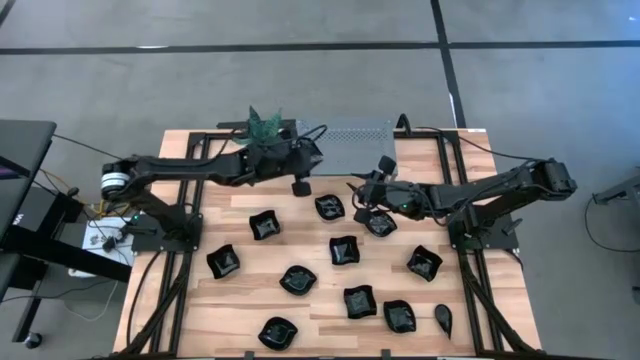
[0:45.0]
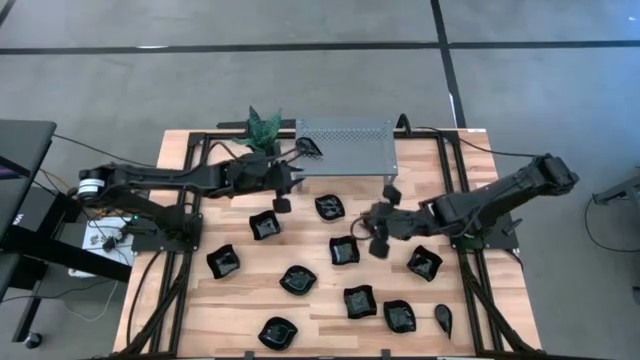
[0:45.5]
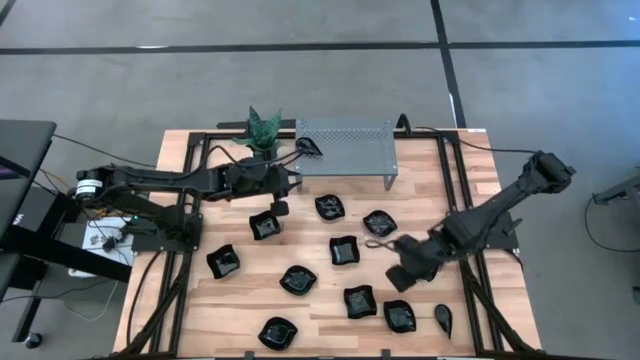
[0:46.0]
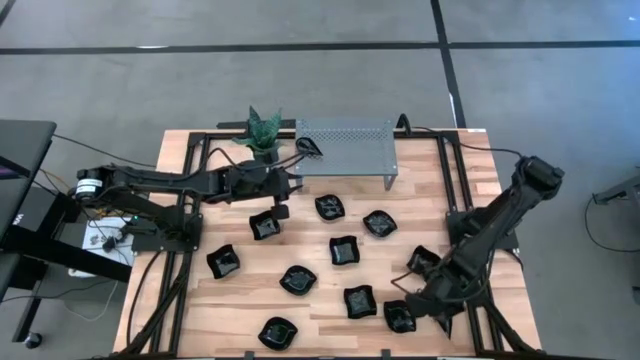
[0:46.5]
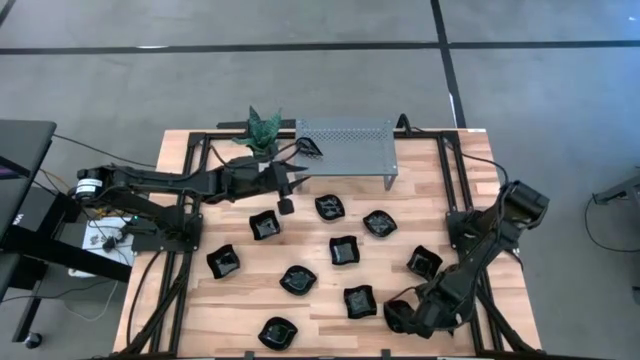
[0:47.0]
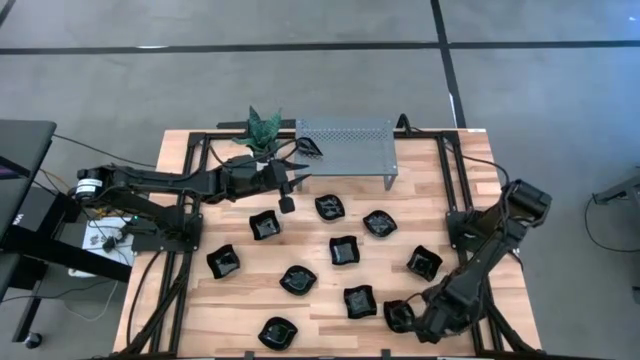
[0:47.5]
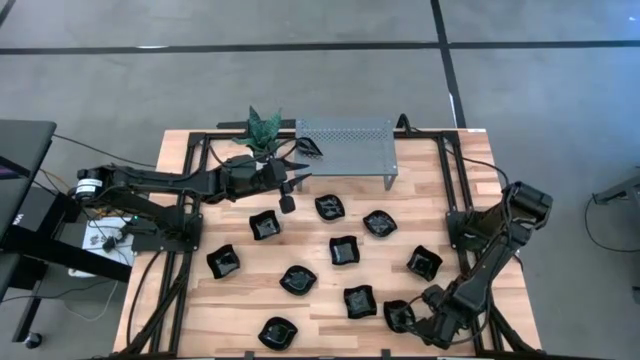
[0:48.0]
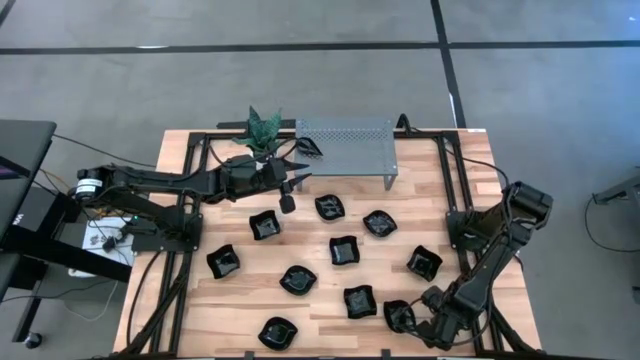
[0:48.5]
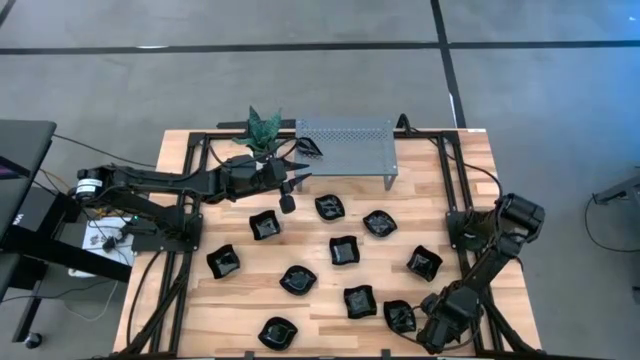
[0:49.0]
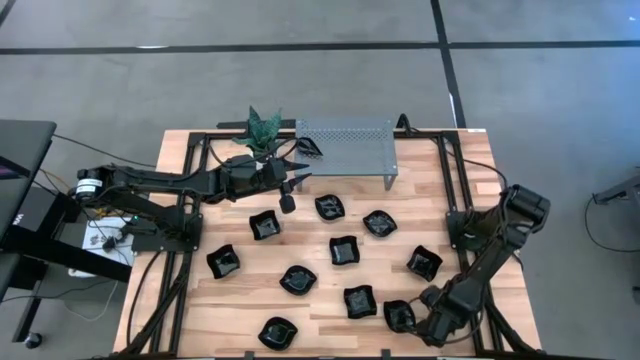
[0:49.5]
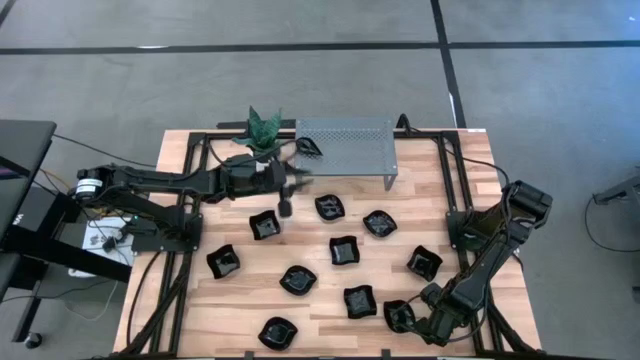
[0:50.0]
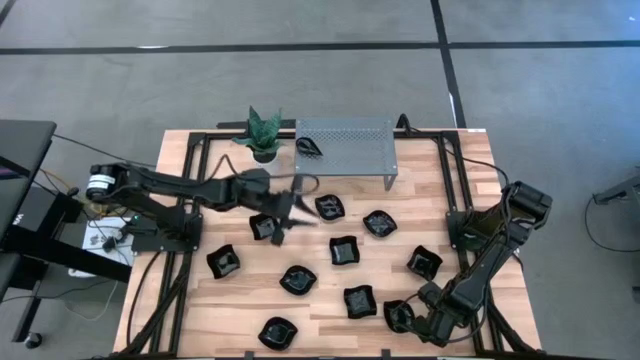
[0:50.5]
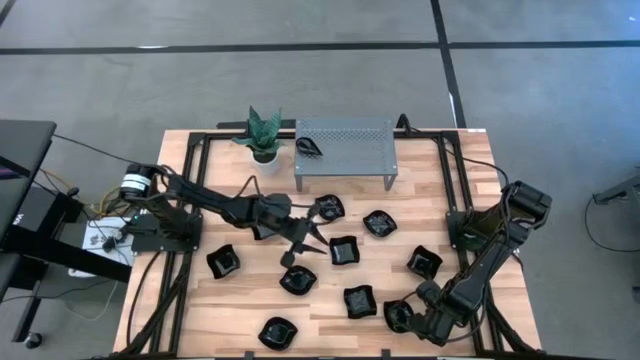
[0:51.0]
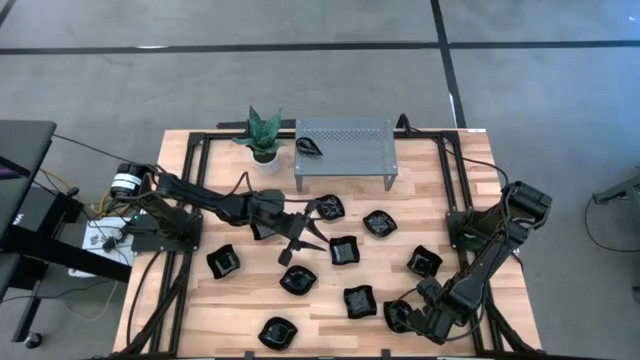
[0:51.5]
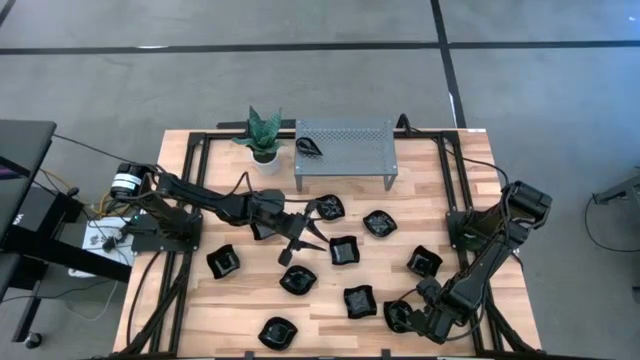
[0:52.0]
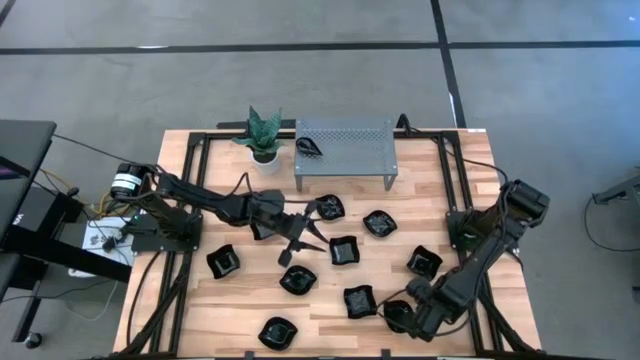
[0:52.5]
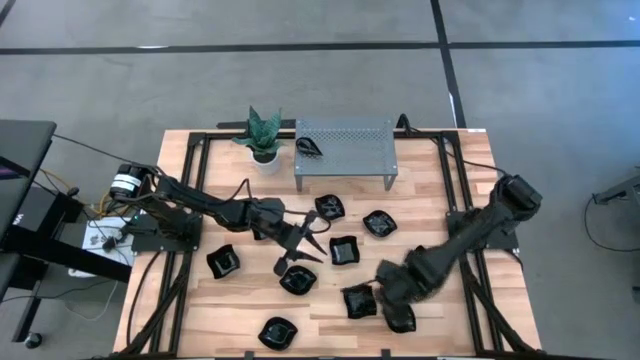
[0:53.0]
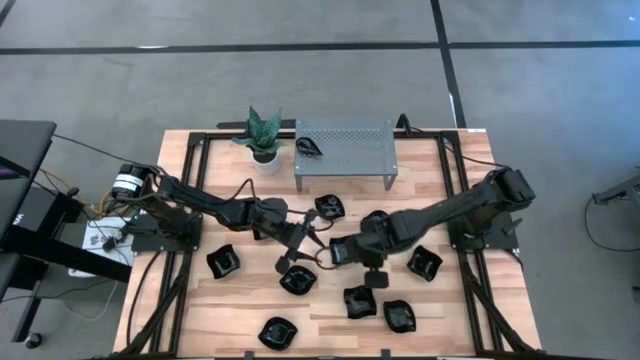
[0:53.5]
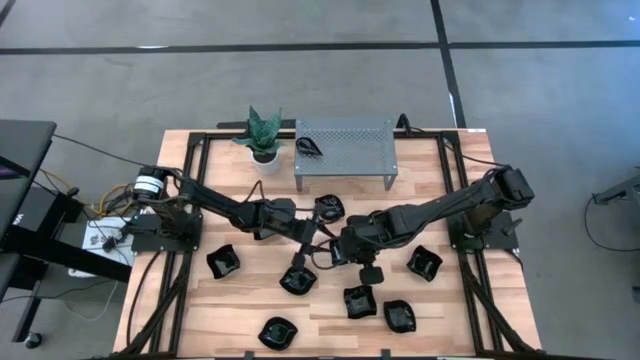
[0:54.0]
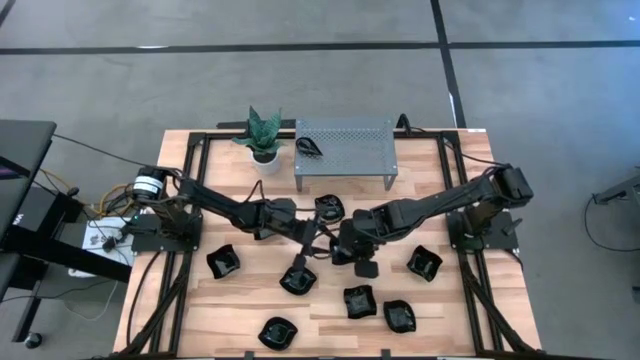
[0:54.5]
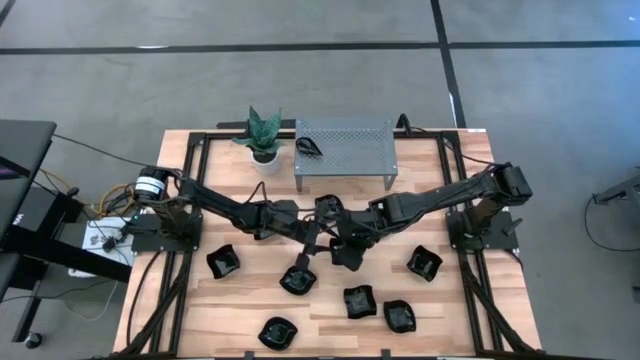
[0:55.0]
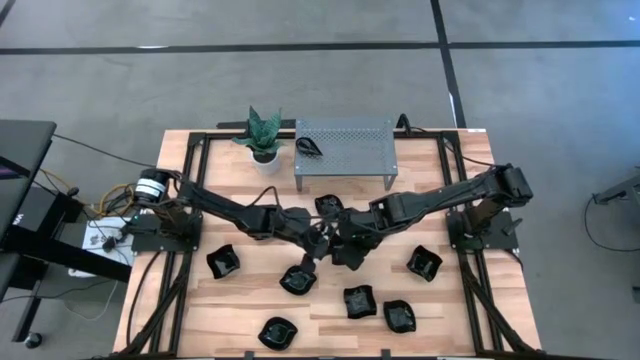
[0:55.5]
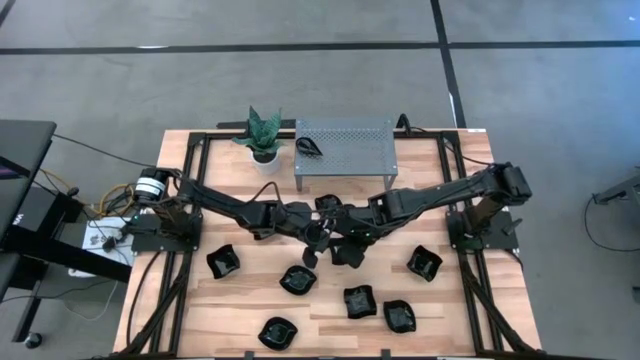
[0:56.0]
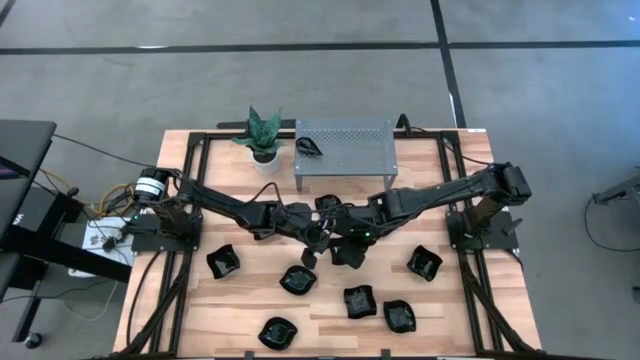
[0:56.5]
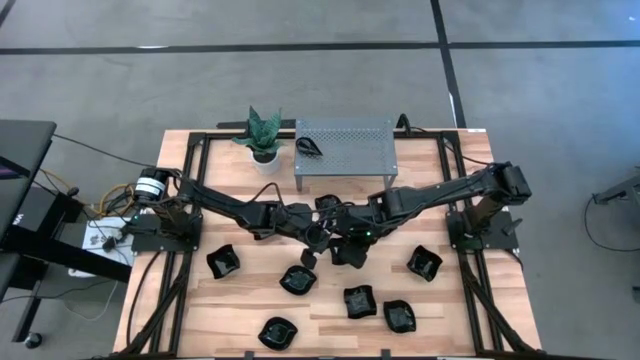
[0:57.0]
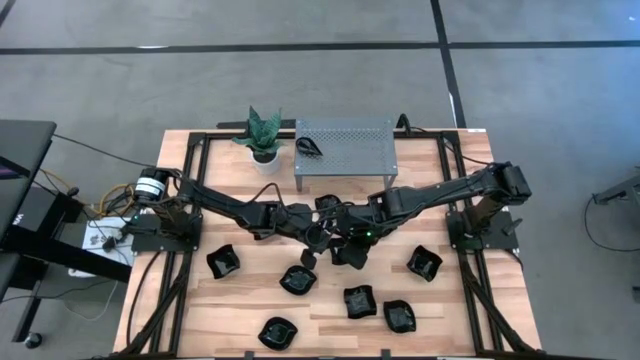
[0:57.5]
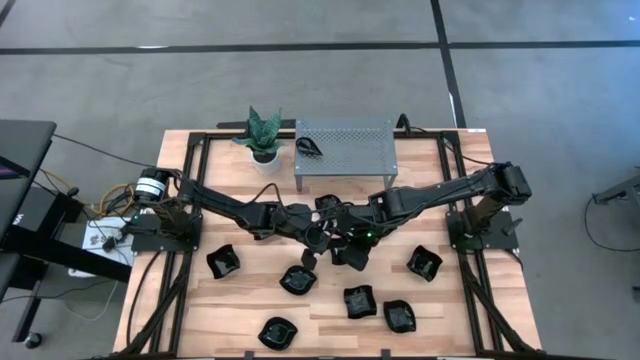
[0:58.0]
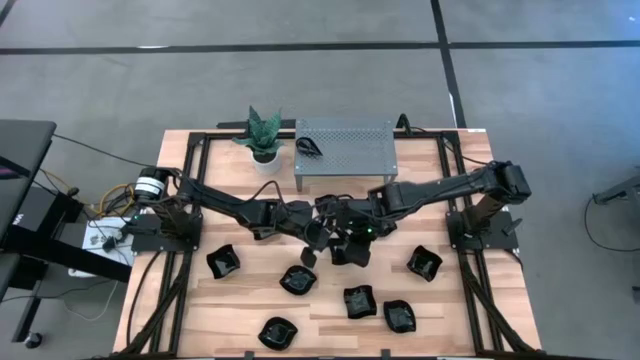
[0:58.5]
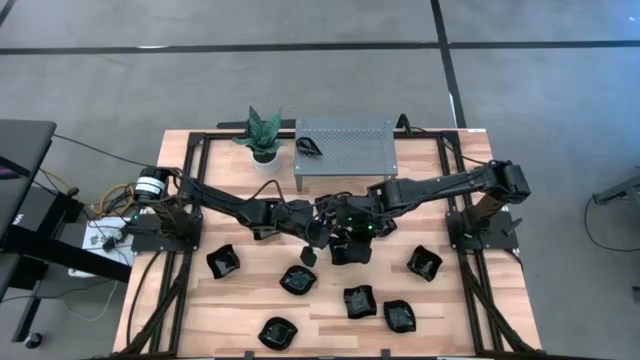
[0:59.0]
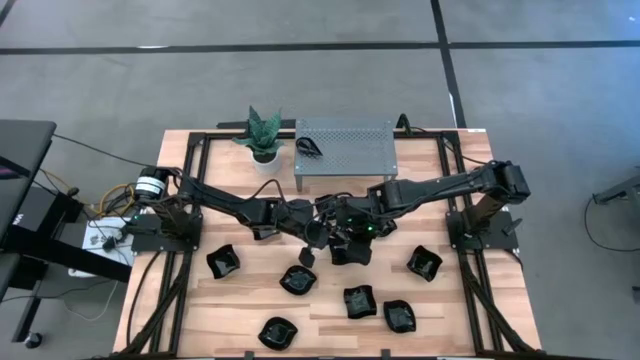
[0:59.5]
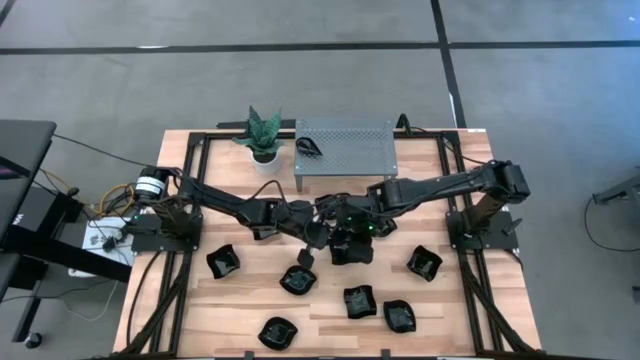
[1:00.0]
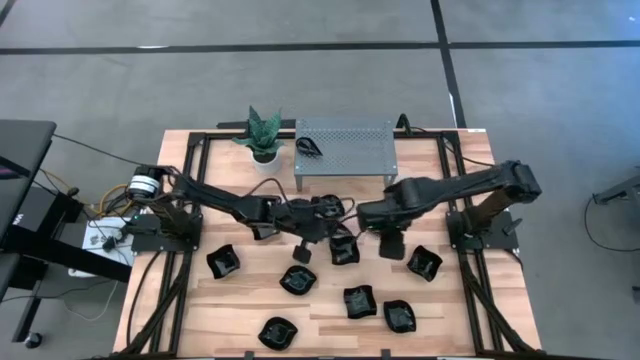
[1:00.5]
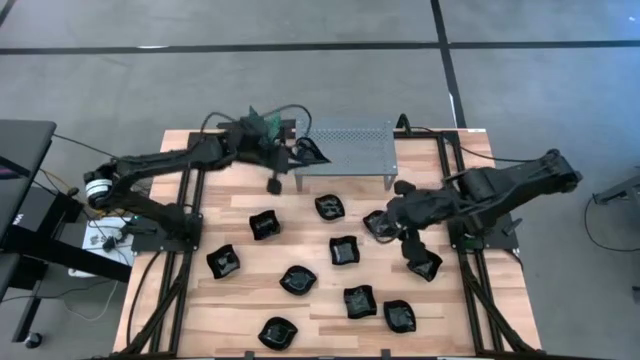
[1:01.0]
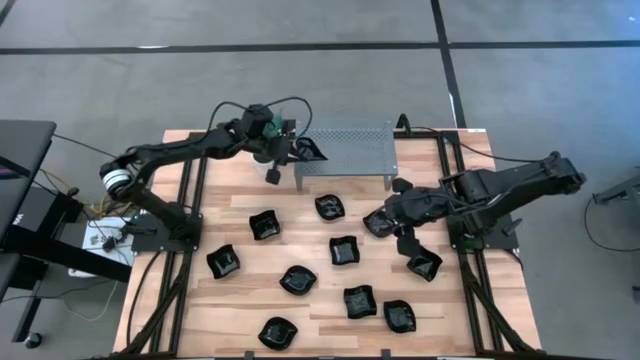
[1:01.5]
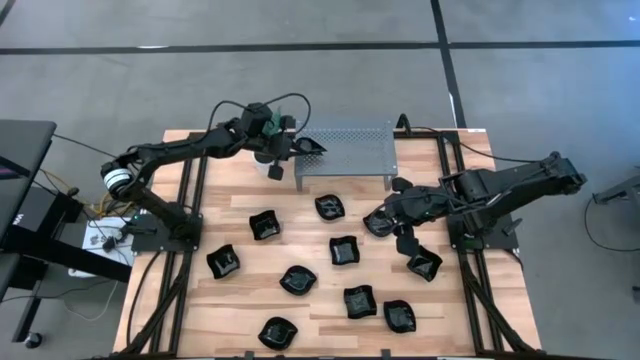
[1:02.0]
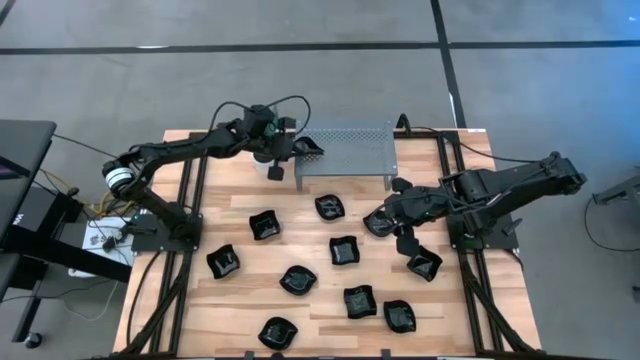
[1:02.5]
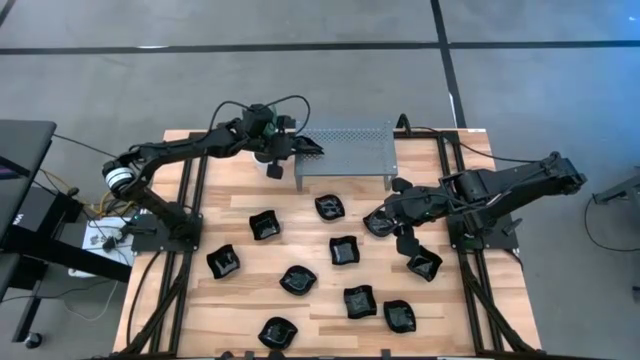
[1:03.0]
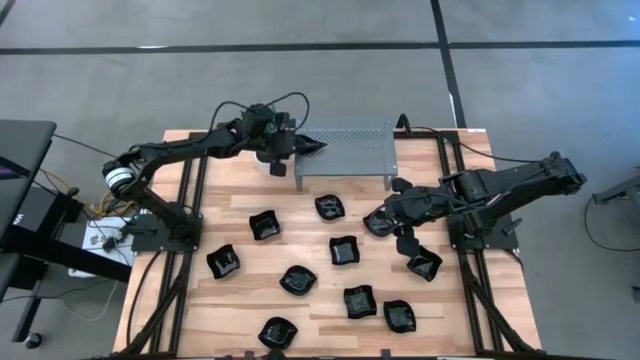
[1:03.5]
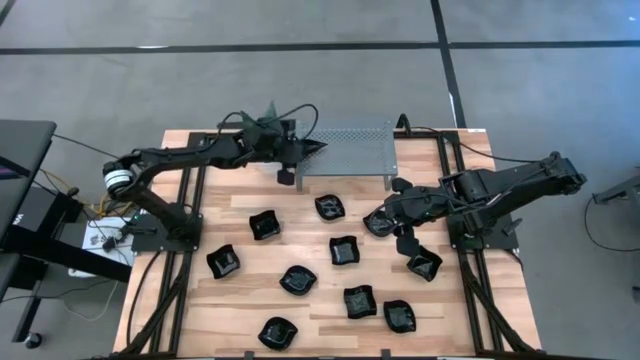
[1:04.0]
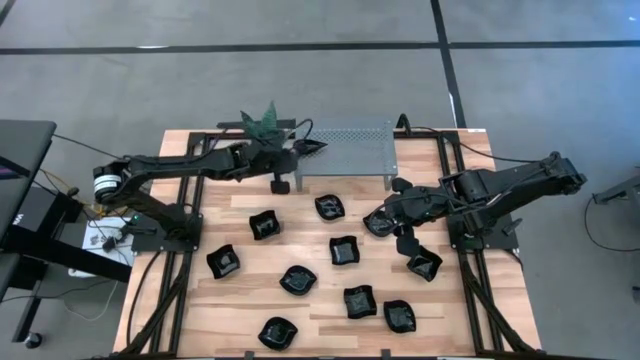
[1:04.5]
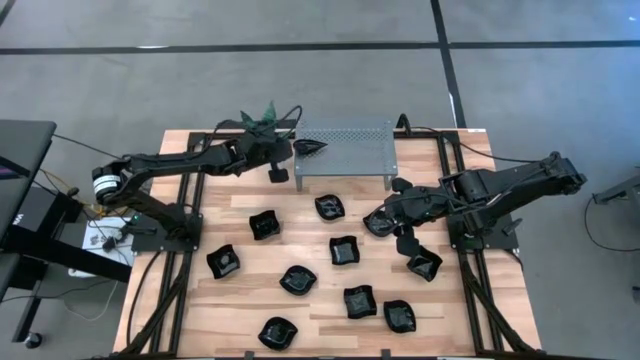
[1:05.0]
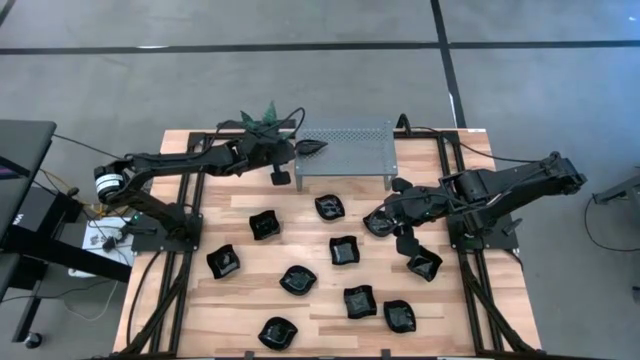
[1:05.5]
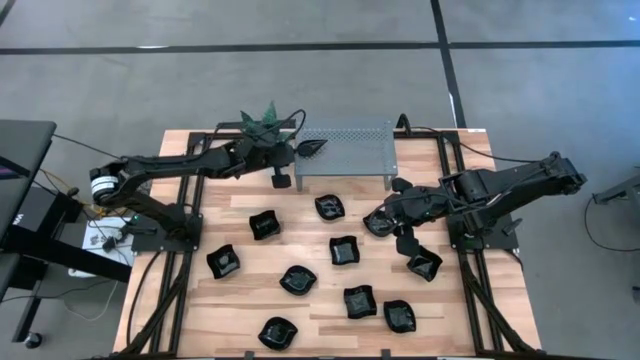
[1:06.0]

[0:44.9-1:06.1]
Task: Pick & Place Mini shaped plates
Stack the drop-shaped plate on top of the drop-shaped plate on the shelf
